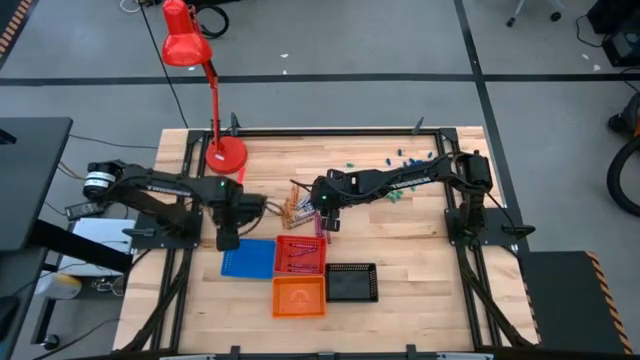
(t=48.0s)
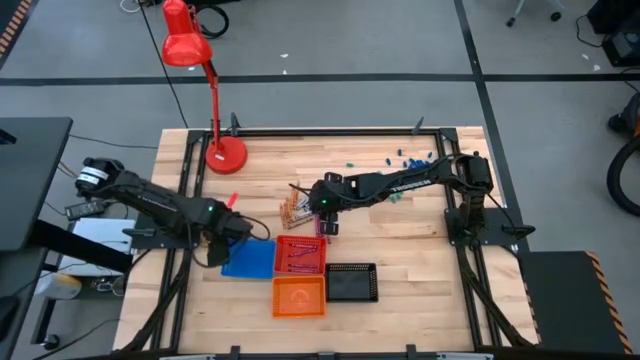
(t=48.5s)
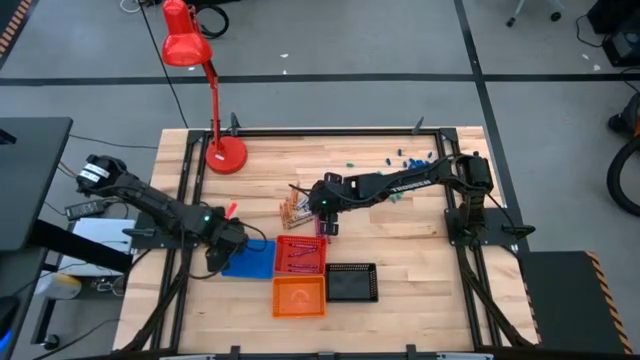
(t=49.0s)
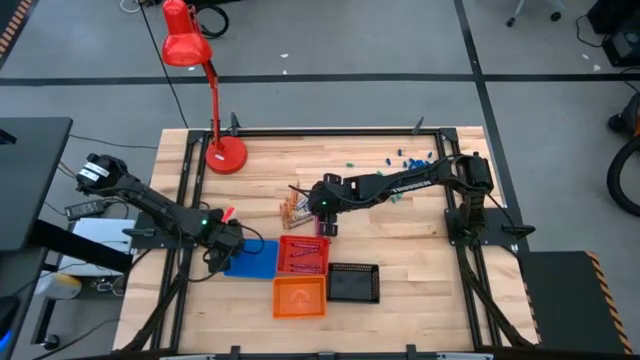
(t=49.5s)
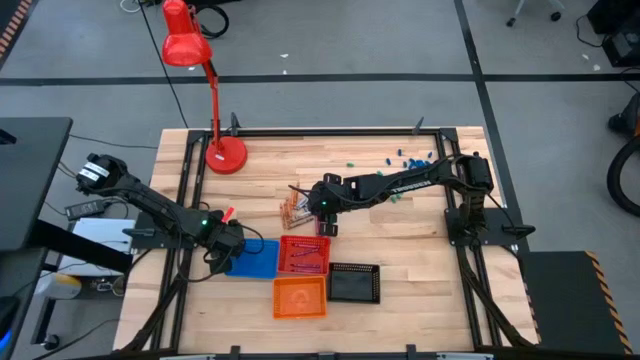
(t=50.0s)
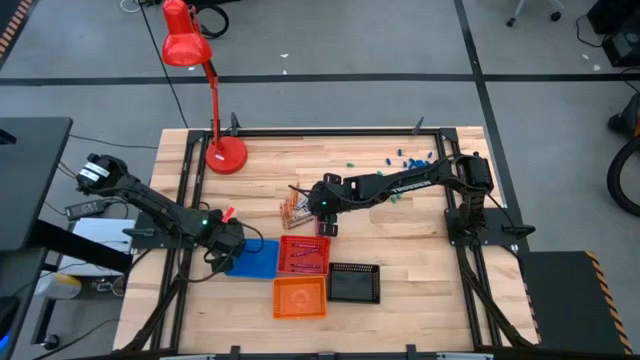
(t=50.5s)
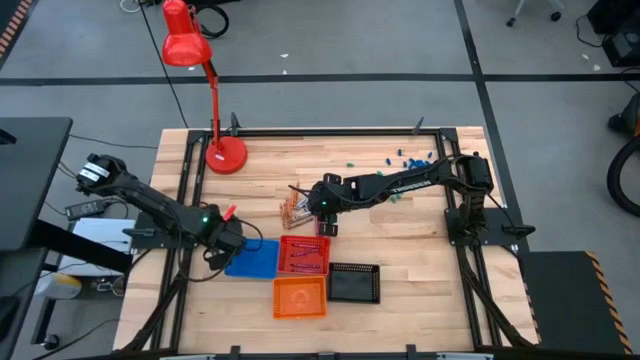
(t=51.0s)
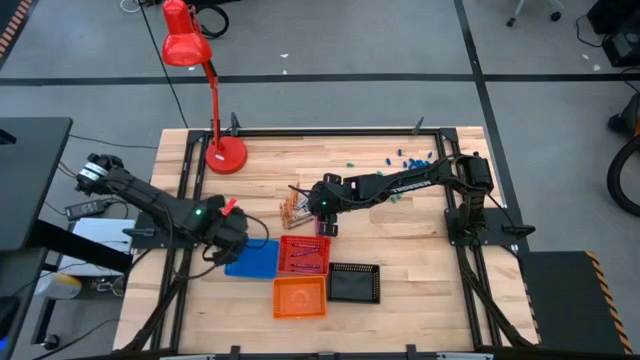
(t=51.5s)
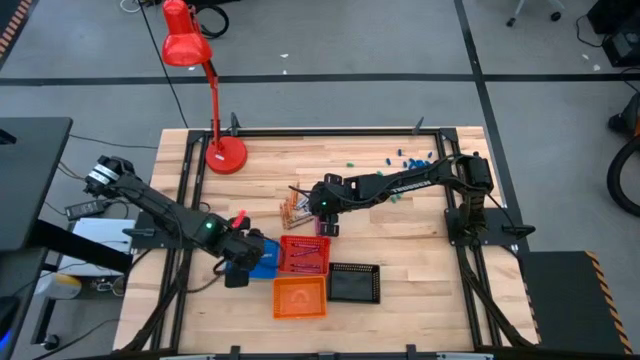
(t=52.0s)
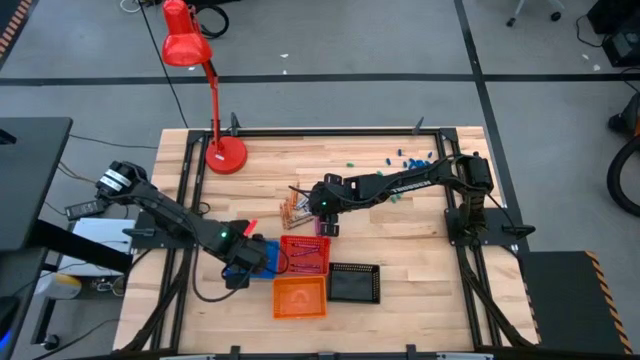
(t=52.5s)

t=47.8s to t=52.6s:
Task: Sort crayons
Put the black crayon into the blue bin

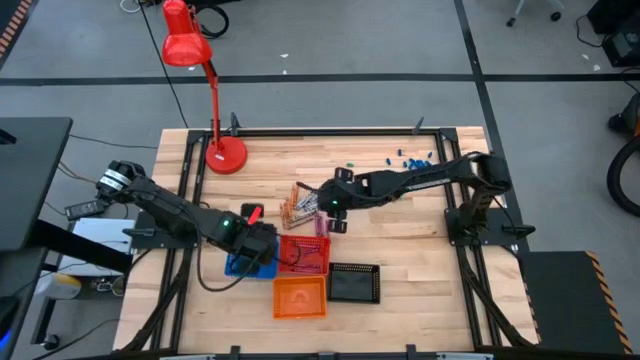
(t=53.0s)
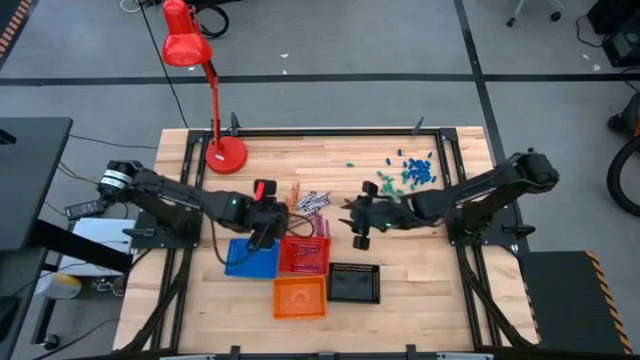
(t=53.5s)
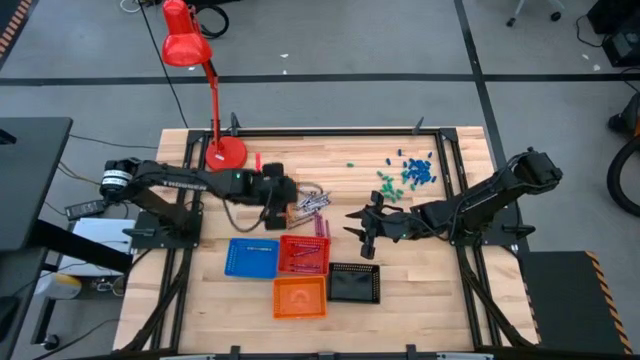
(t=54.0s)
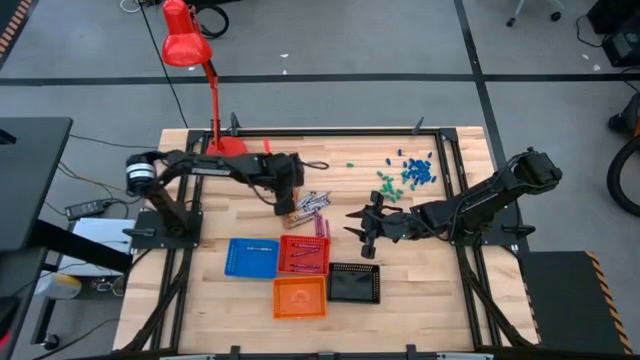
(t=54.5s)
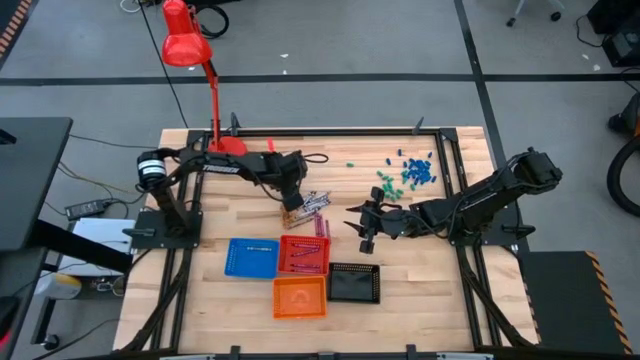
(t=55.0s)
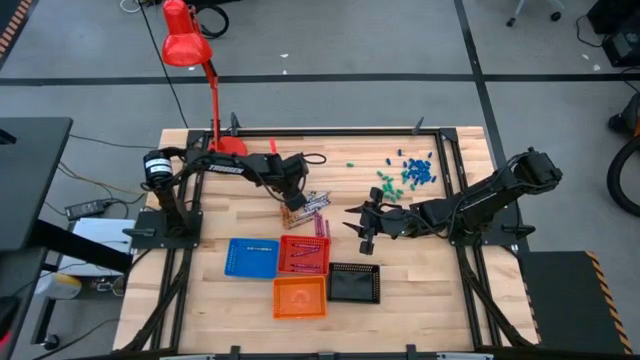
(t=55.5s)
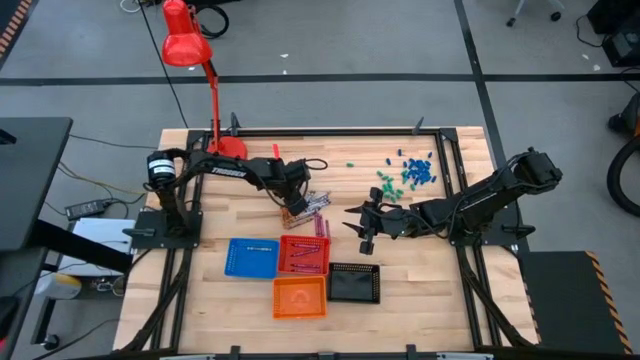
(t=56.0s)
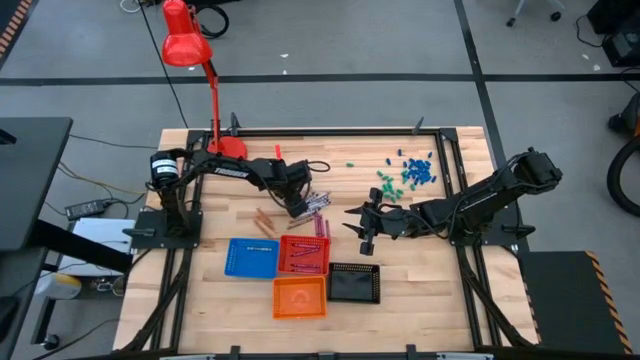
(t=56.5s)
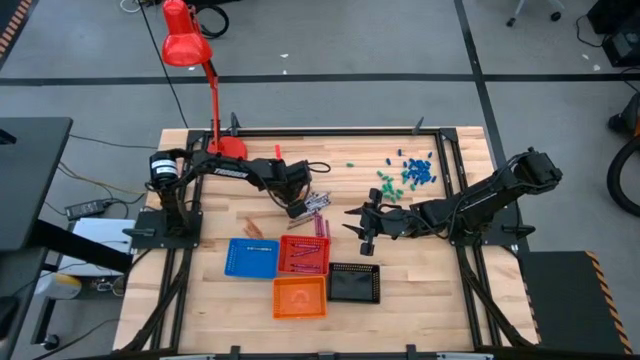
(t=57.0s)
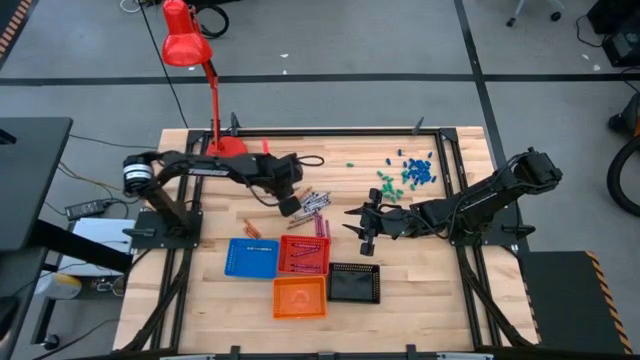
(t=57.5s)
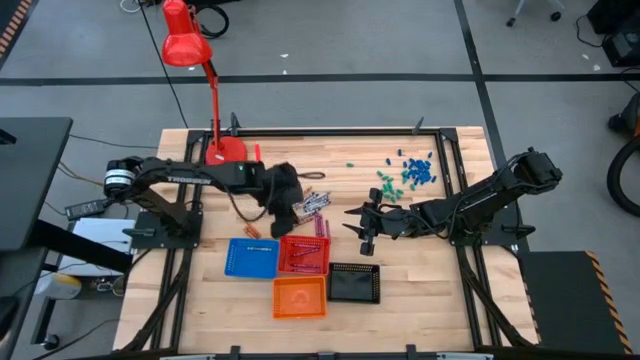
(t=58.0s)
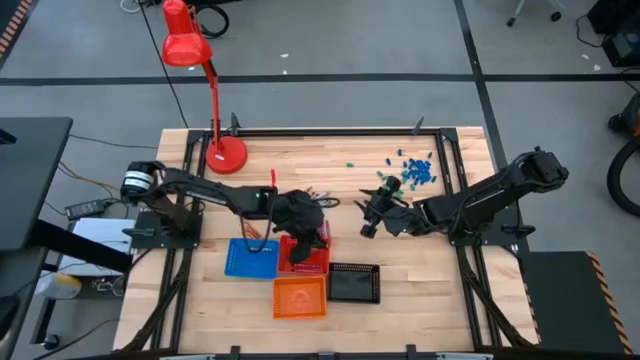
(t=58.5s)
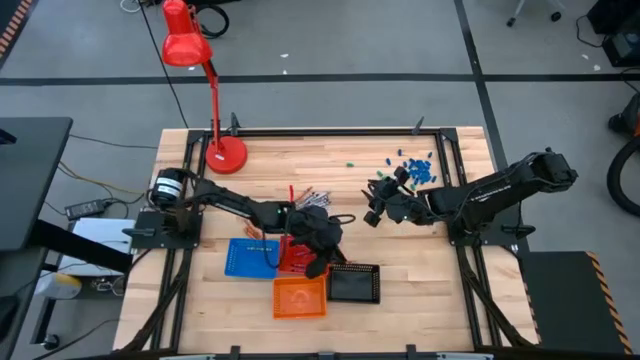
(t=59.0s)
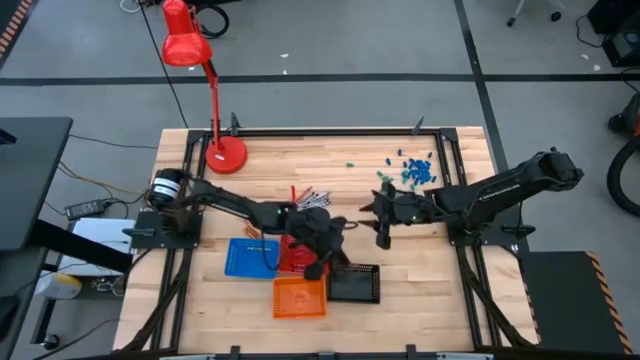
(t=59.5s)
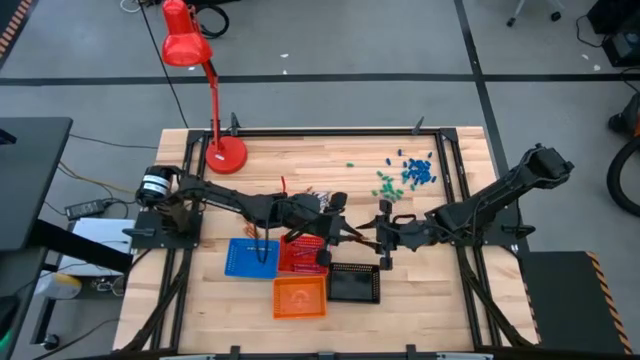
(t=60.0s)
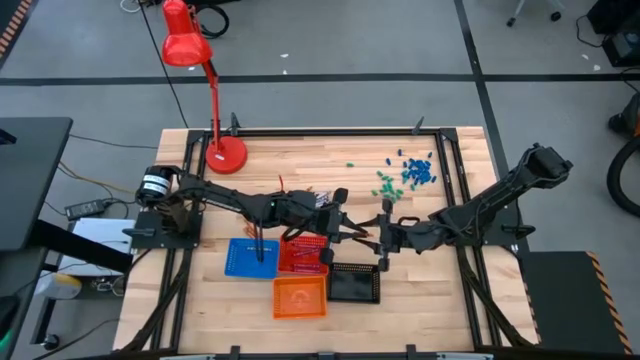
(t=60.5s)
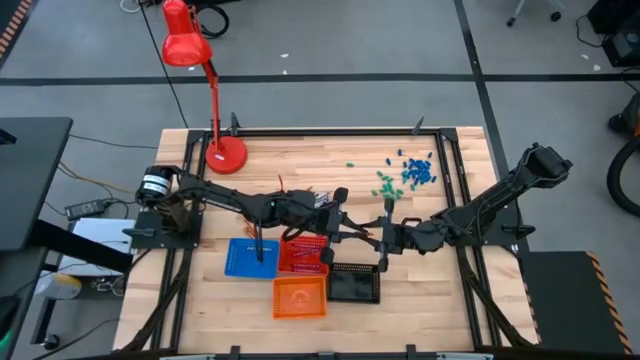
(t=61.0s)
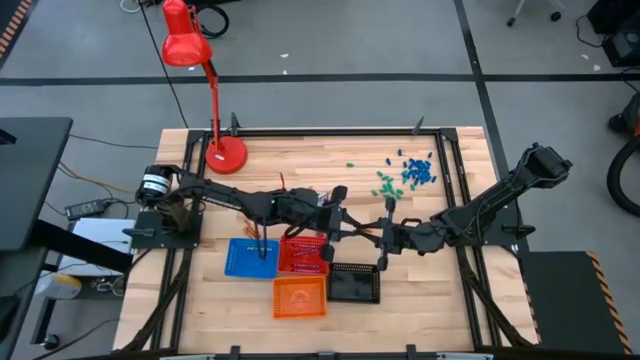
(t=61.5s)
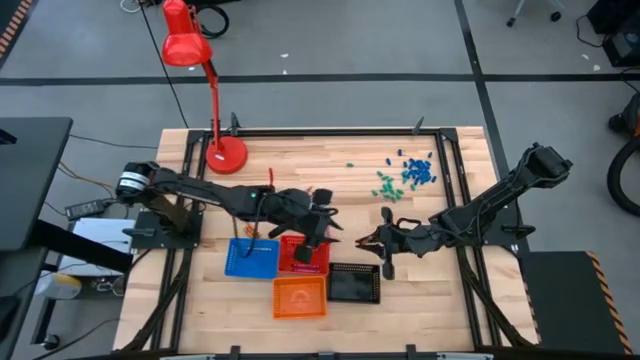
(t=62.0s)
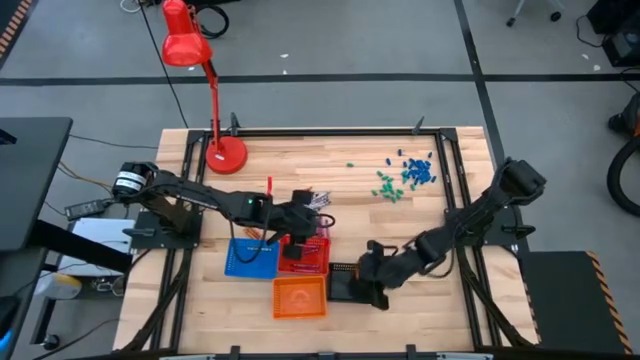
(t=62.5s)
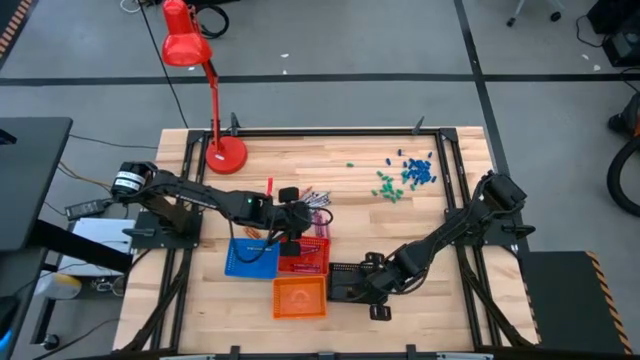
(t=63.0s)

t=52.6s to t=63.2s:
Put the orange crayon into the black bin

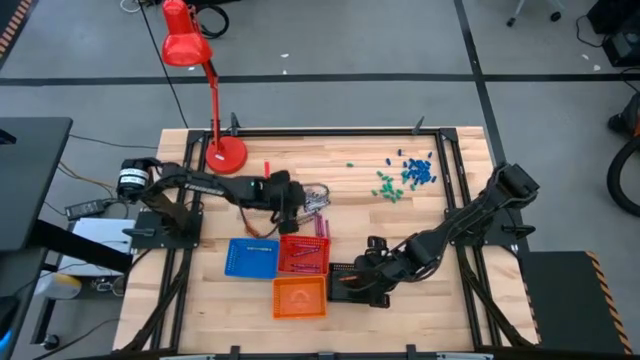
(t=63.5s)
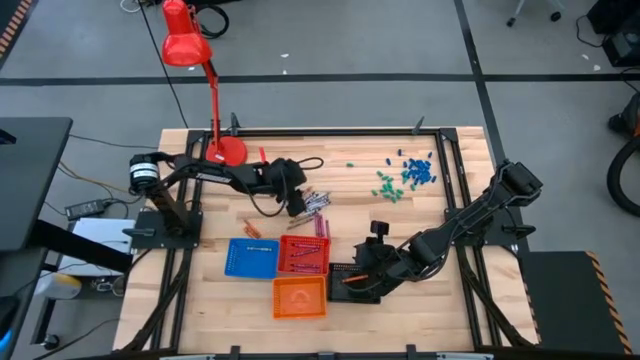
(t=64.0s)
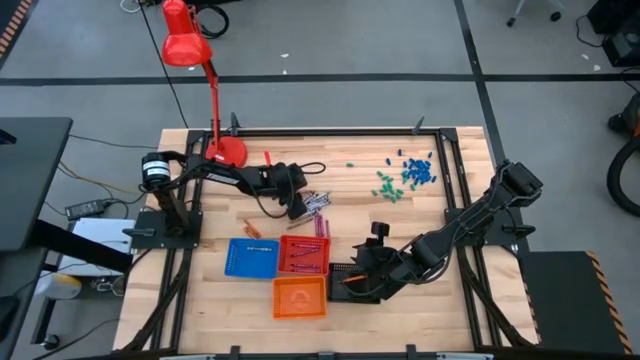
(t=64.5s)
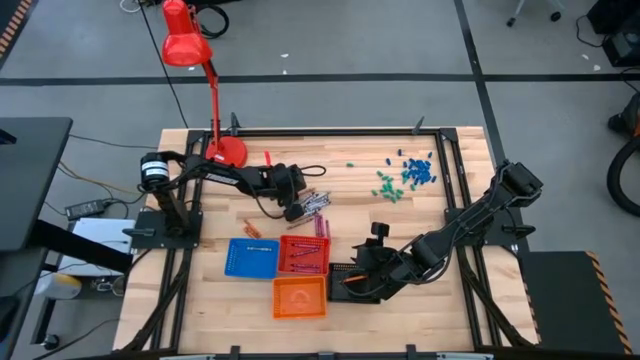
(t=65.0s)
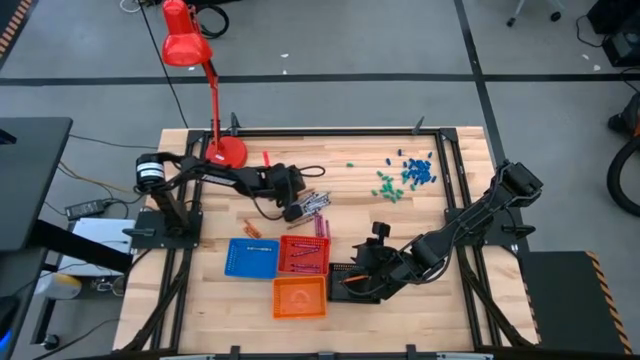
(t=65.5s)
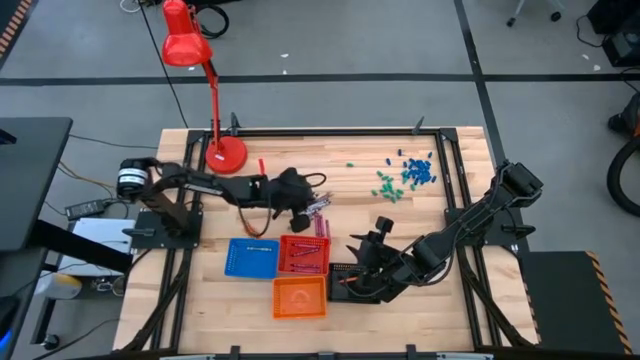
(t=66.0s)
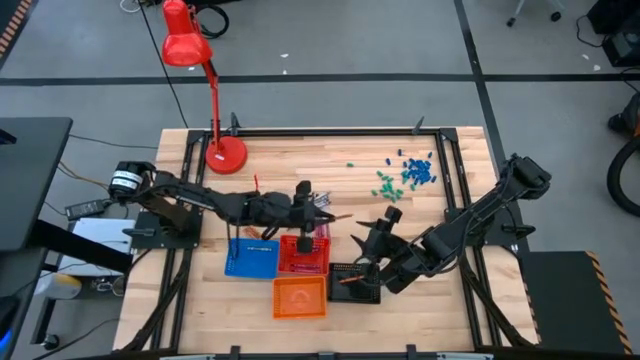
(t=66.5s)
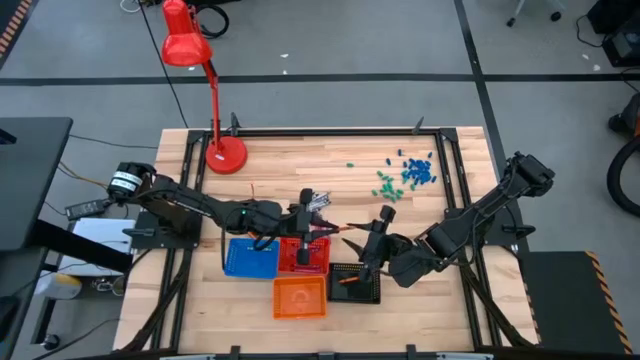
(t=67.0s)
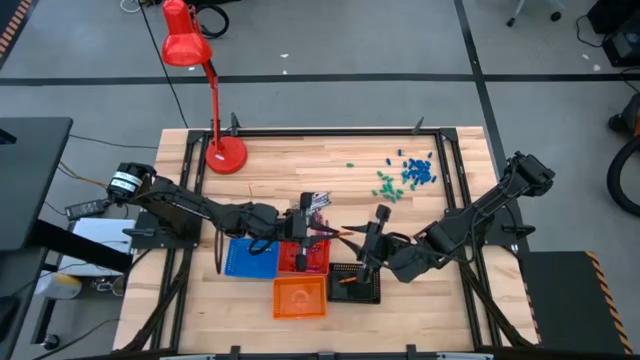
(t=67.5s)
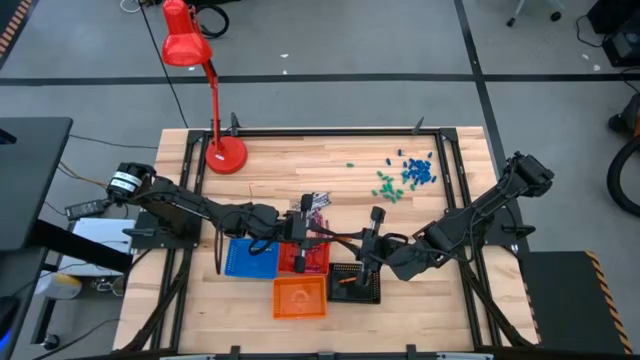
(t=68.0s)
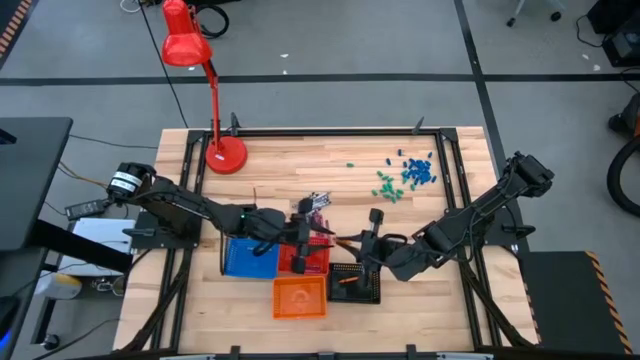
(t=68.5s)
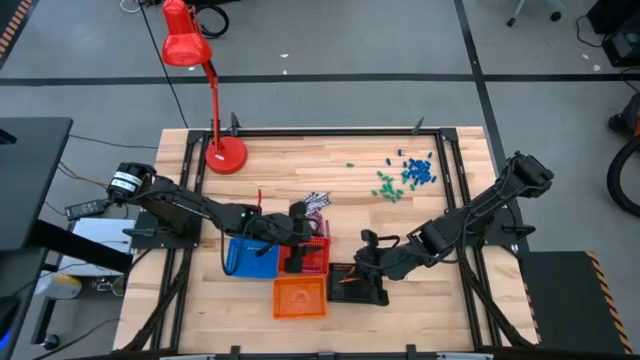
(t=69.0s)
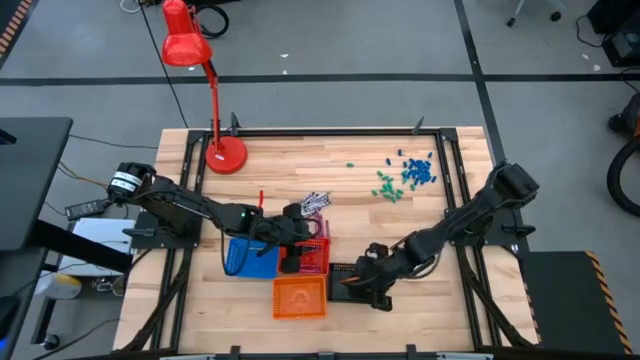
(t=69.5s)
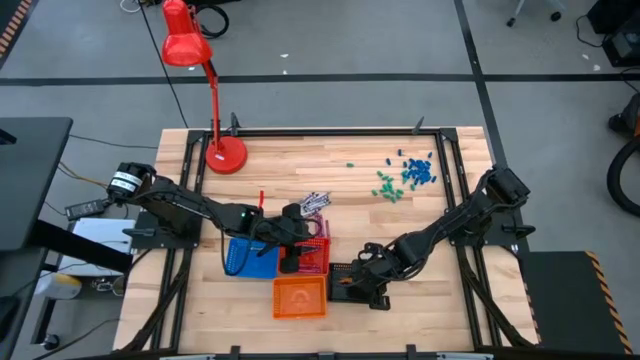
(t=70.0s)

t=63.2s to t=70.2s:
Put the orange crayon into the black bin
